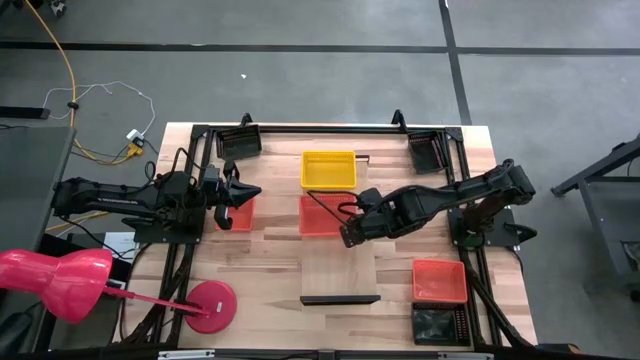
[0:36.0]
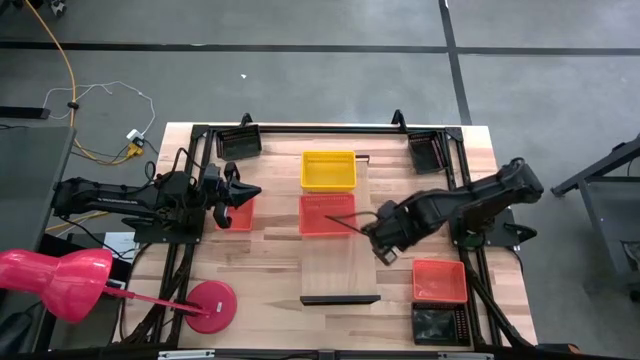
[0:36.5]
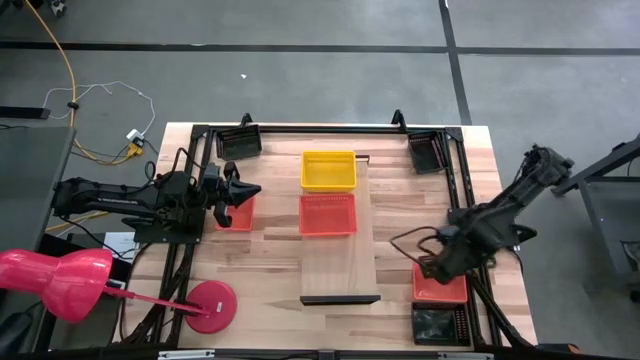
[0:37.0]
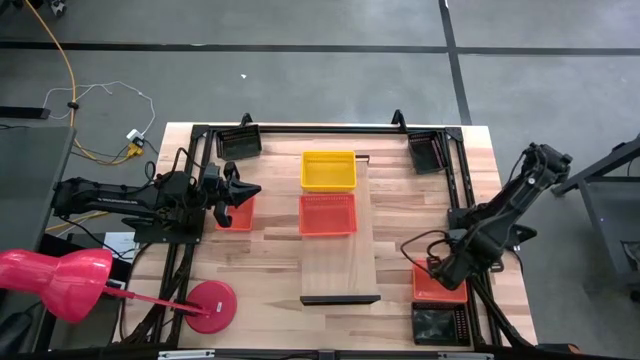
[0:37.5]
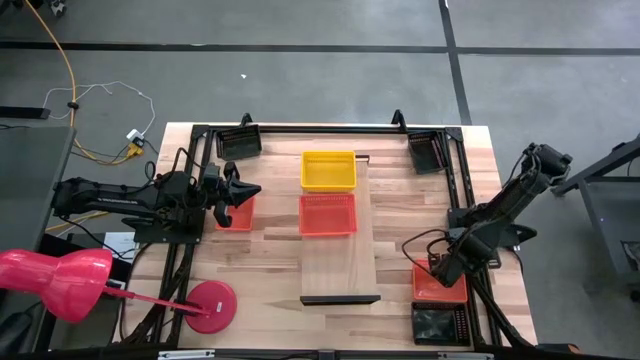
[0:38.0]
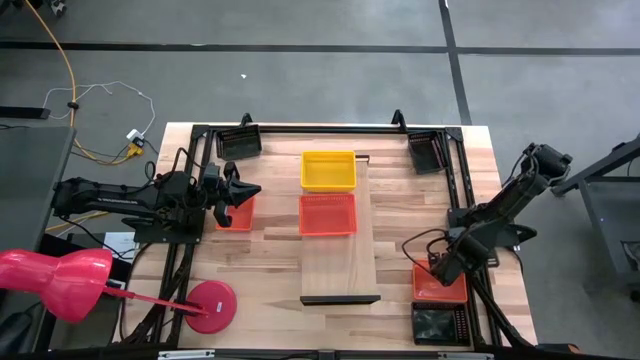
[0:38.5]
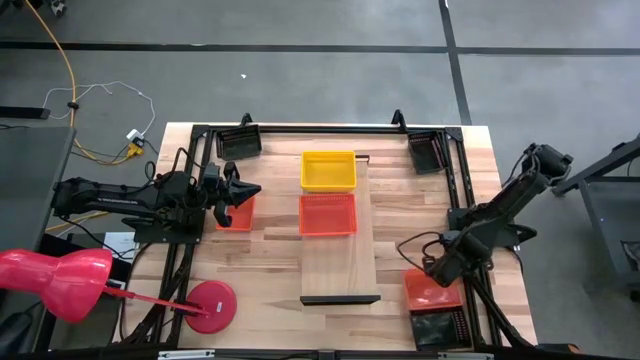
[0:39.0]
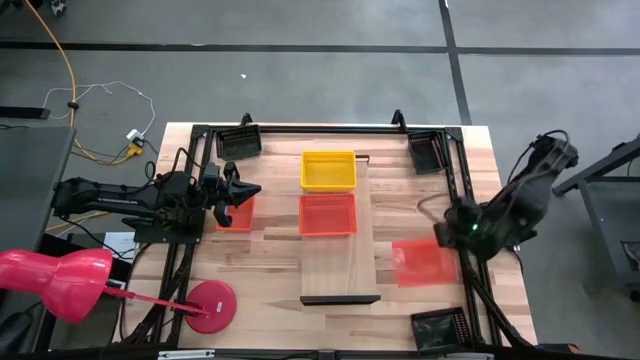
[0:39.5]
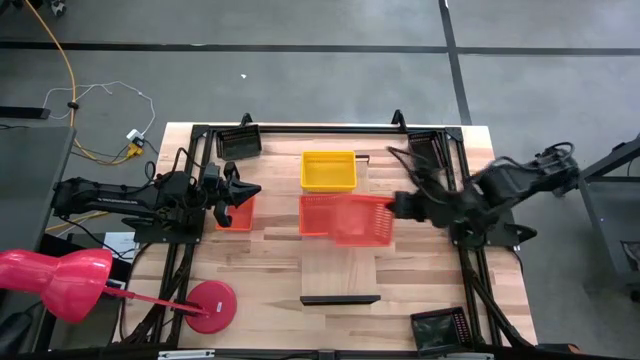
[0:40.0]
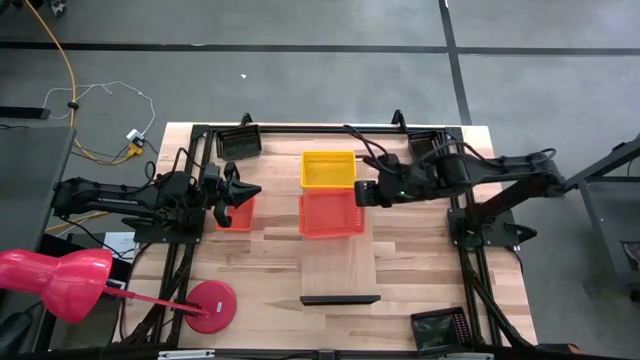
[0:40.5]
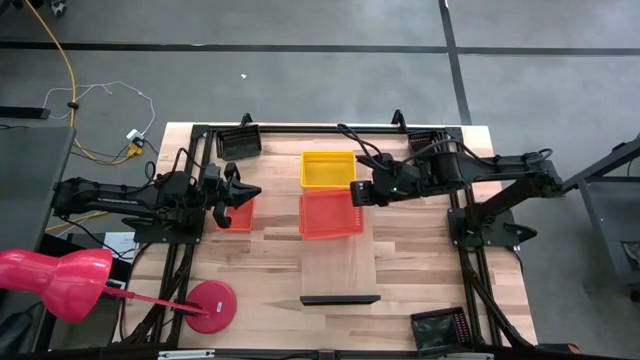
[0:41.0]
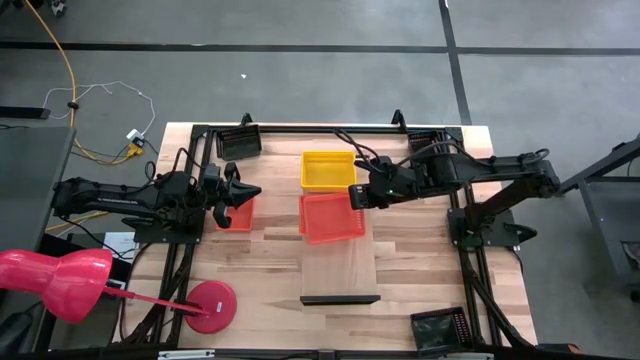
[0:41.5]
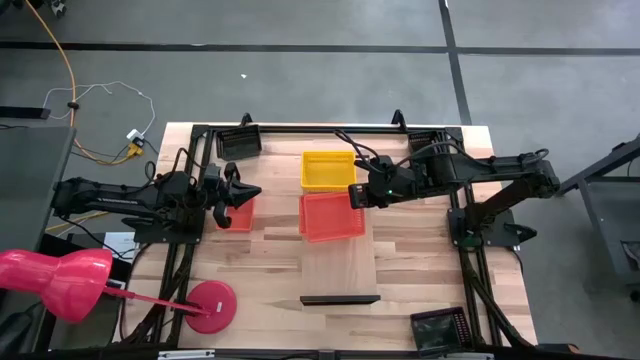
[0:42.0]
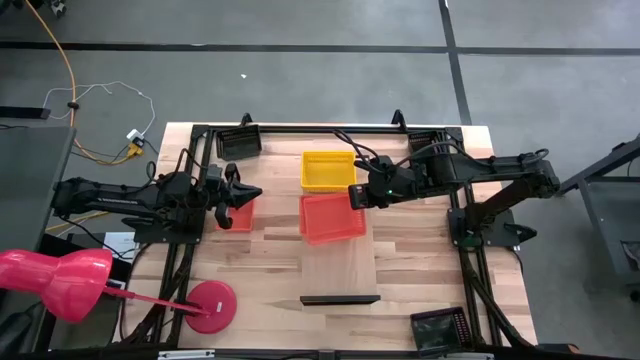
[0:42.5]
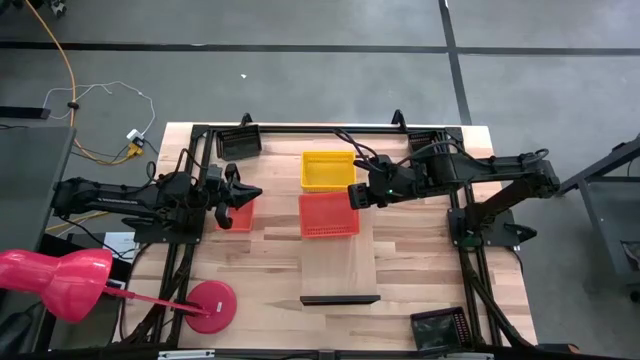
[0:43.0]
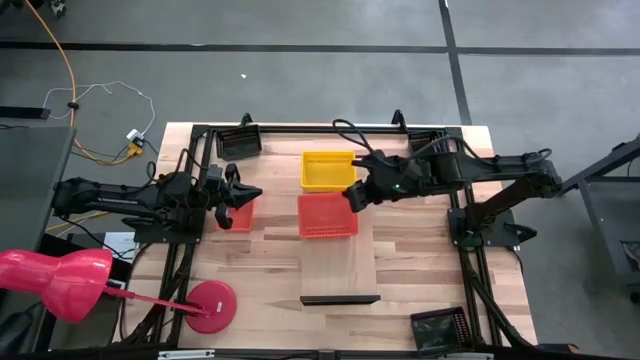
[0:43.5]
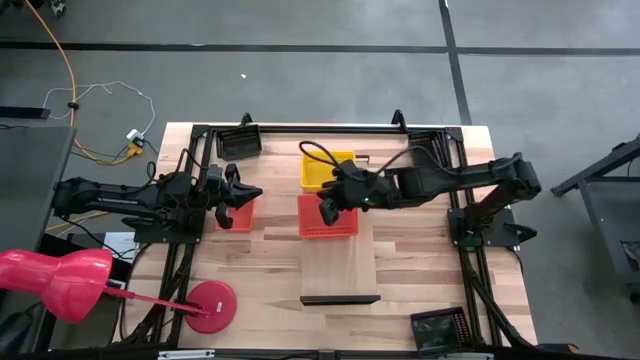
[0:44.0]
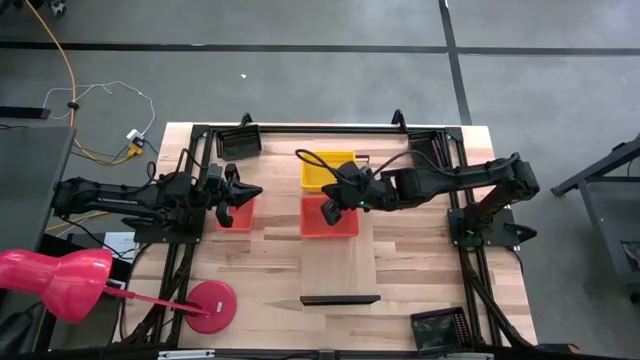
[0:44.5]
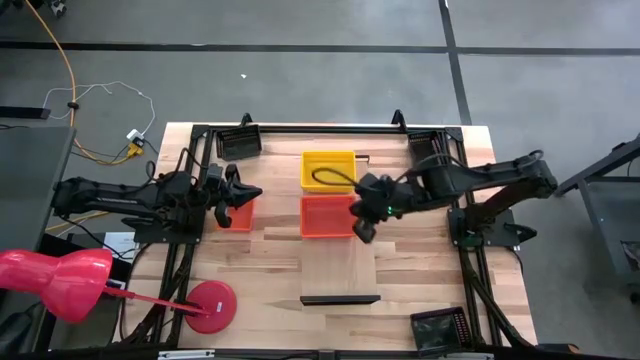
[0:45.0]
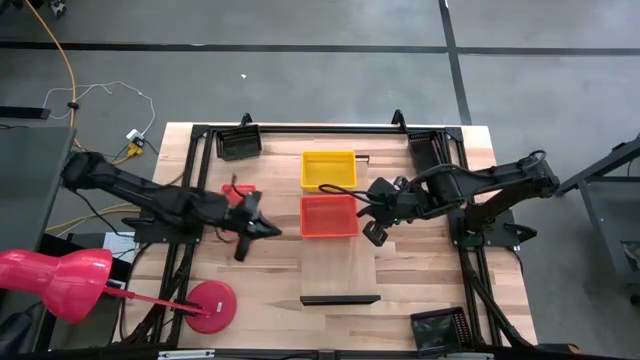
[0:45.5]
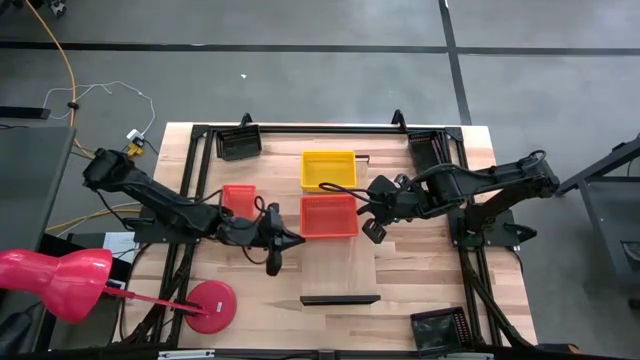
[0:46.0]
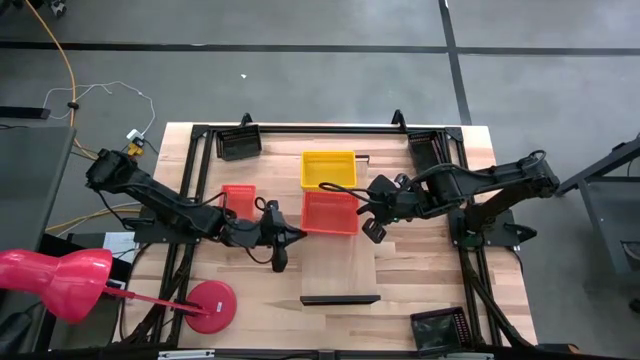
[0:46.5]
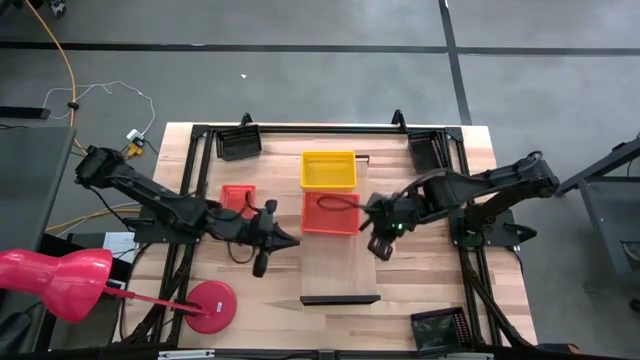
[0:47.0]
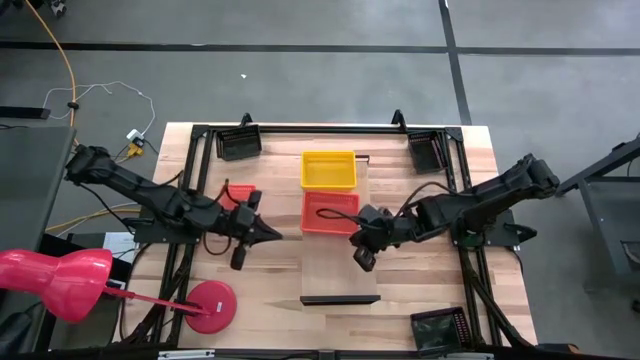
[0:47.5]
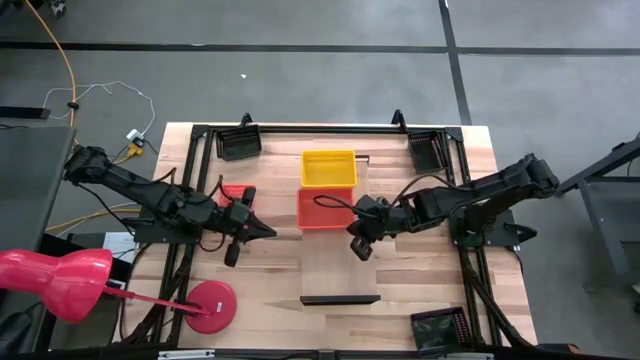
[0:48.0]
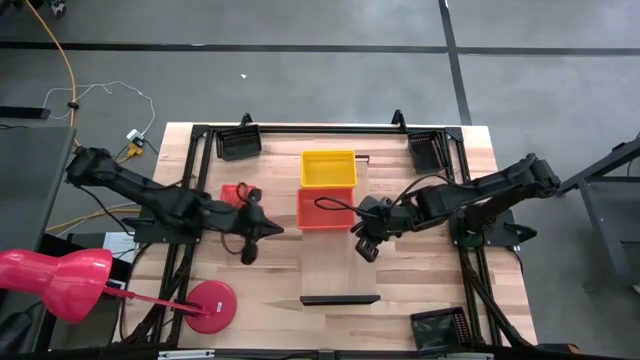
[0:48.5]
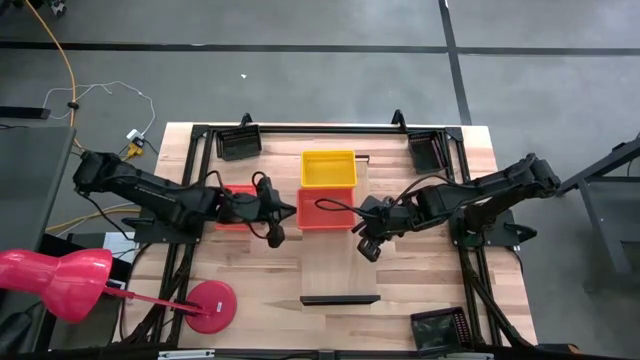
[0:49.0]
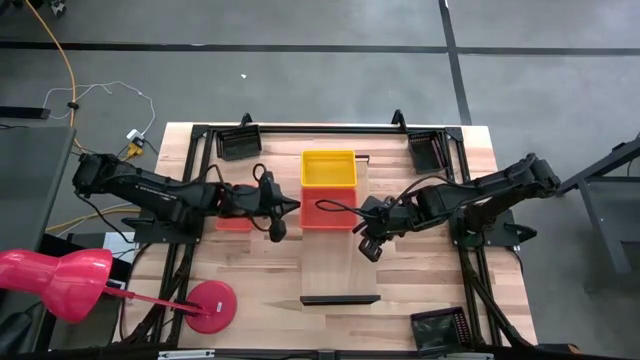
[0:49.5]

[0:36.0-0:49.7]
Task: Stack baskets on shelf by color
Stack the bottom orange bin on top of the orange bin on the shelf

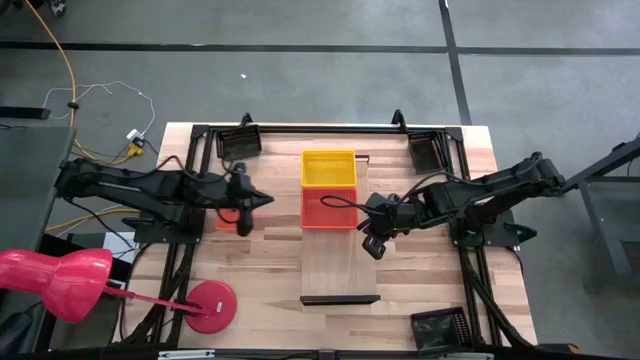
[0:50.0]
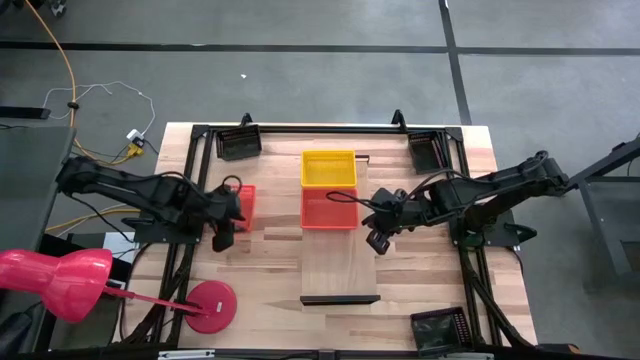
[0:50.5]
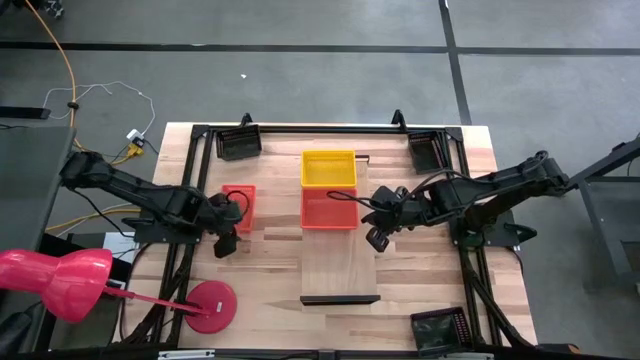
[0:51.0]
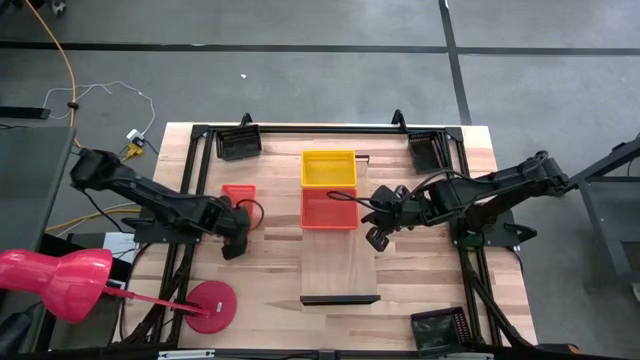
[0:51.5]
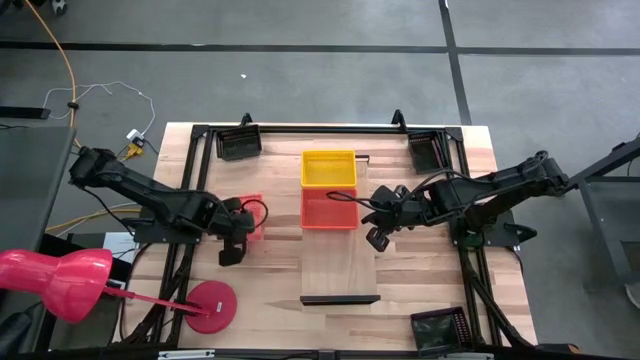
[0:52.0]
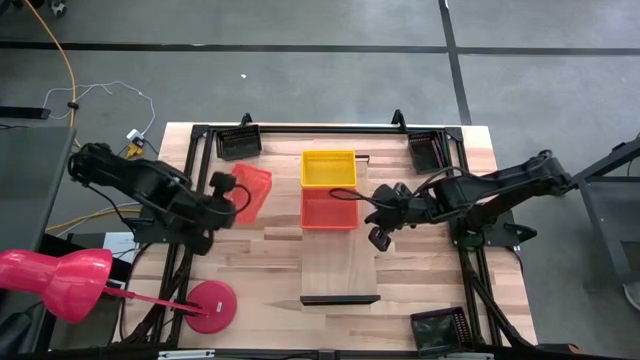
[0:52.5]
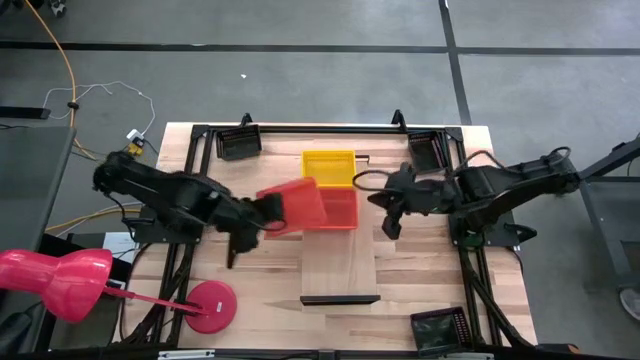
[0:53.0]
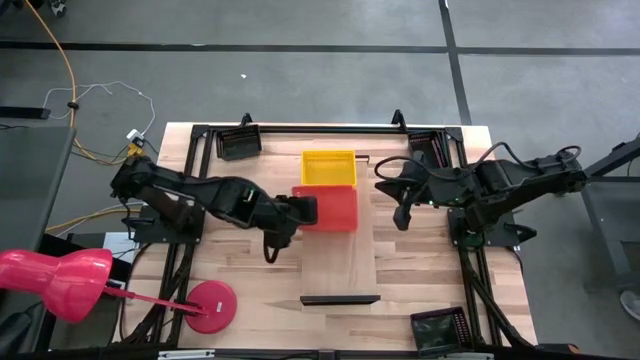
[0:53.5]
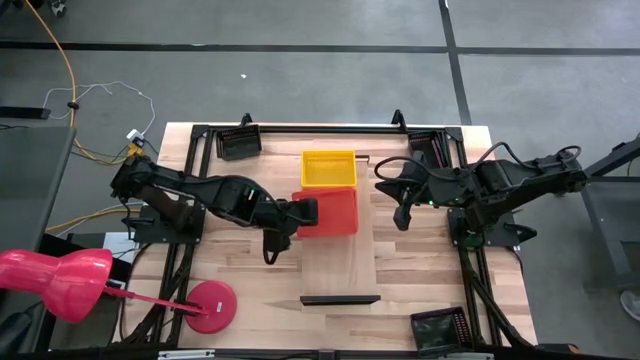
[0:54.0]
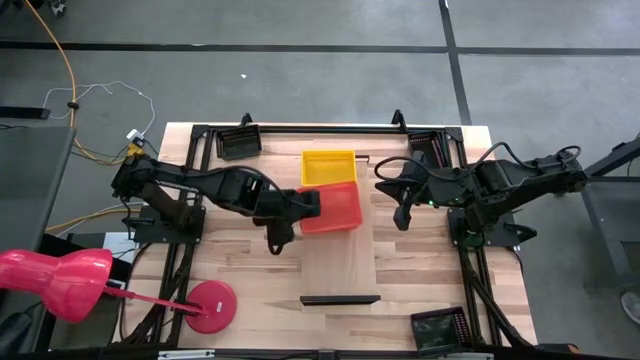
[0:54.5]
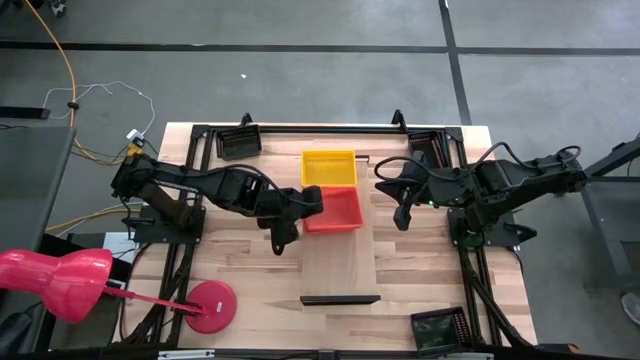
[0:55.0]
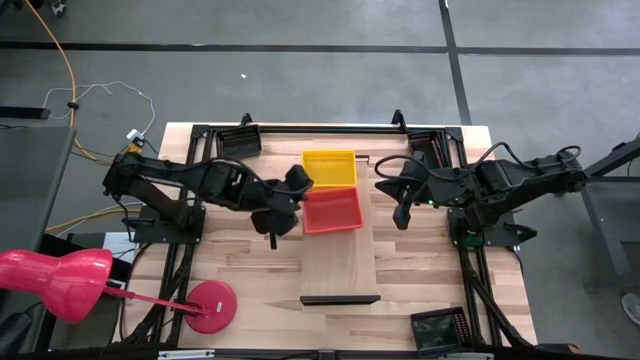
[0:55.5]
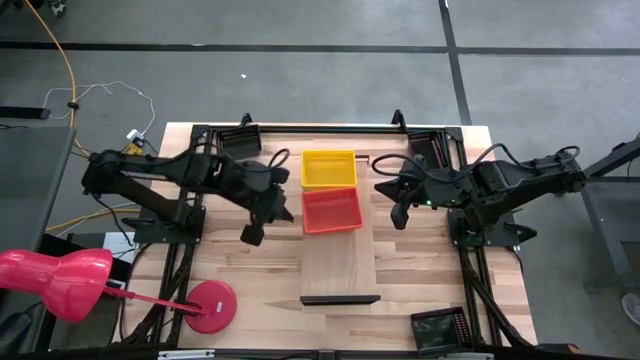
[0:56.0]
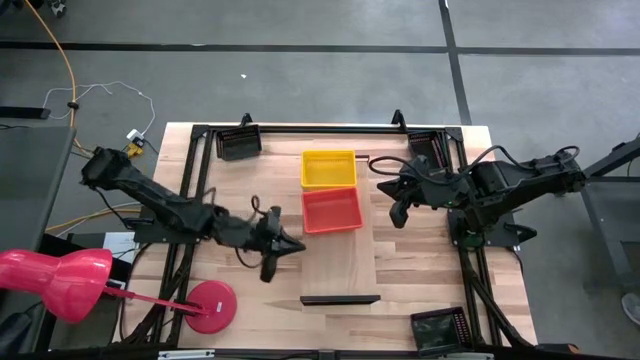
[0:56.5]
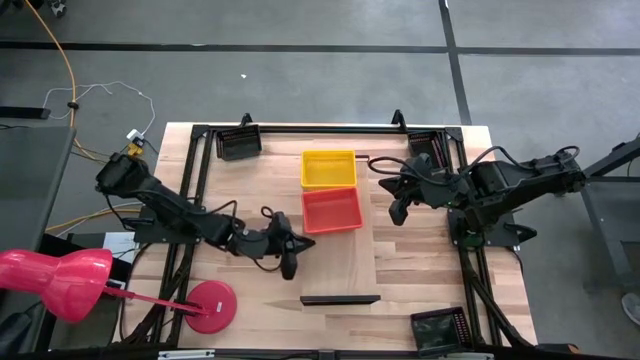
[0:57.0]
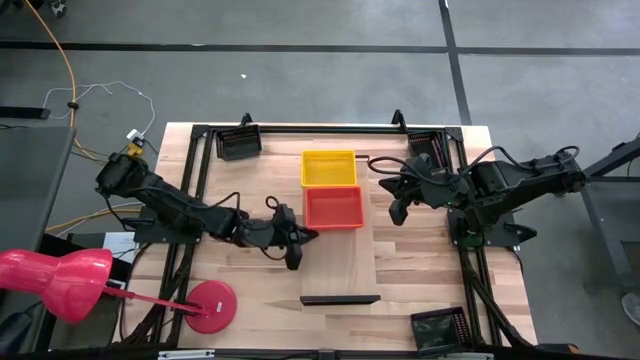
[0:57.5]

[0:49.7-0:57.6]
Stack the orange bin on top of the orange bin on the shelf
